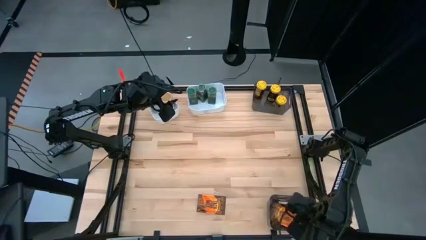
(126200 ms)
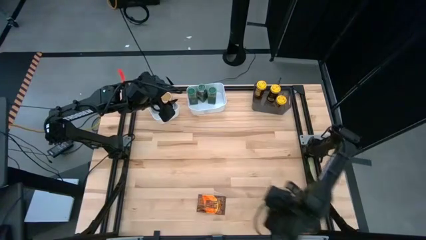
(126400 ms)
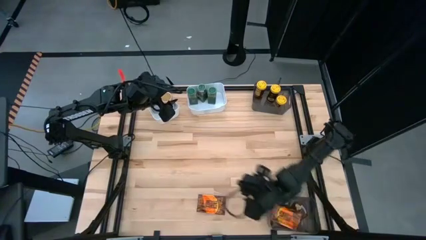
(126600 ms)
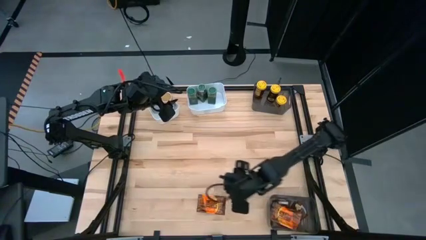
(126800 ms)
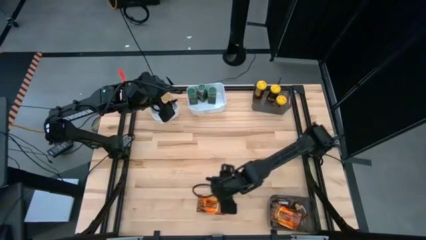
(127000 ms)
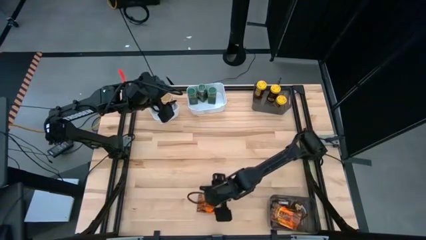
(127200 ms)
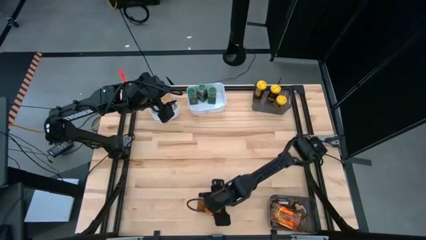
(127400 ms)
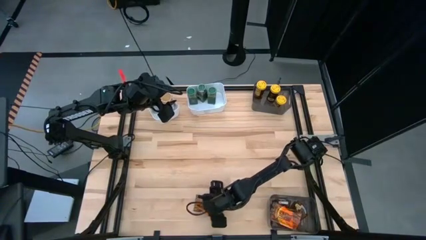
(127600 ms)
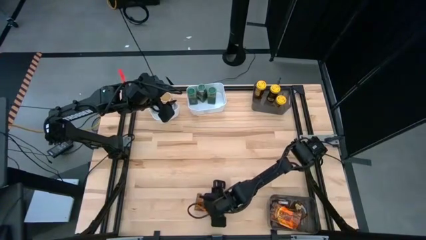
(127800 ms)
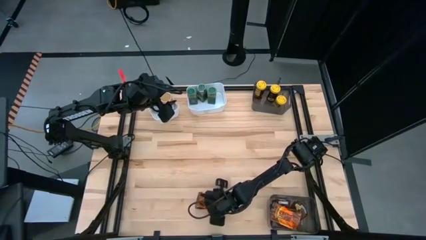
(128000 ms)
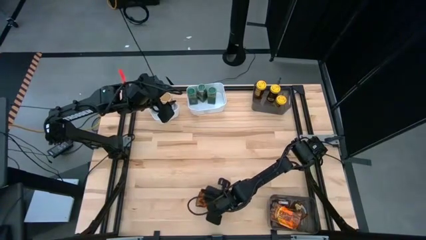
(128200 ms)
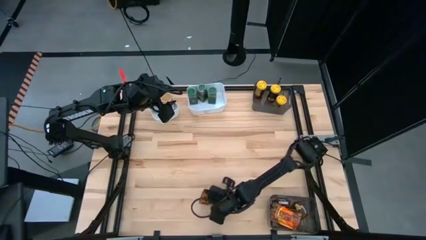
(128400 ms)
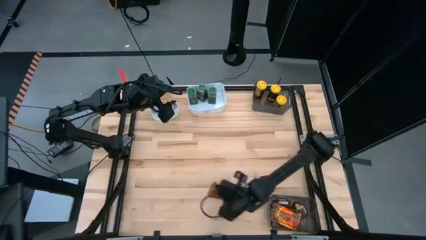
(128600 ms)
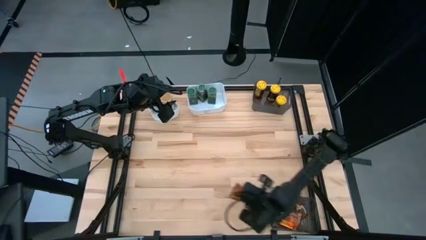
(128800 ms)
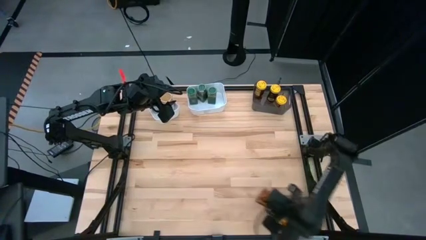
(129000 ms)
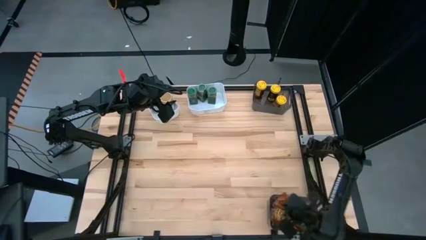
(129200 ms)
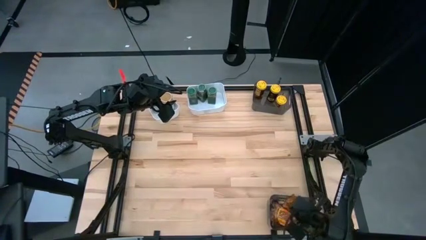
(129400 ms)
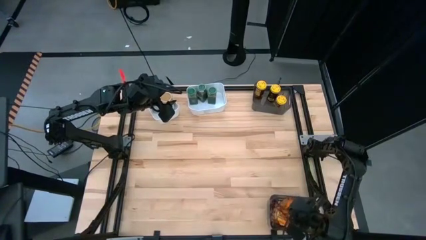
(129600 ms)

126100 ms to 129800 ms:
Task: Sort spices by type
Put the orange seasoning bag into the bottom black bin

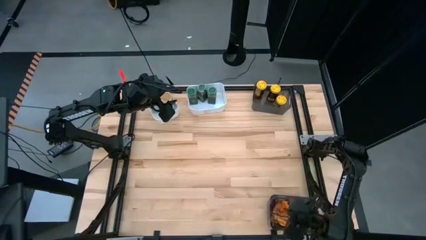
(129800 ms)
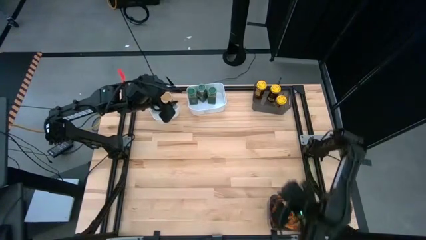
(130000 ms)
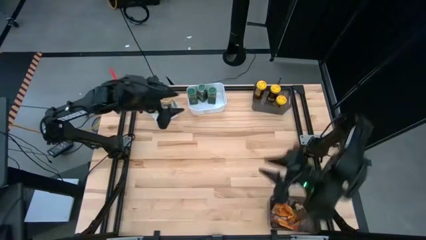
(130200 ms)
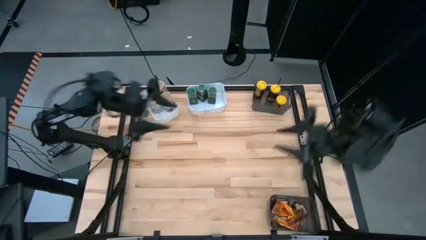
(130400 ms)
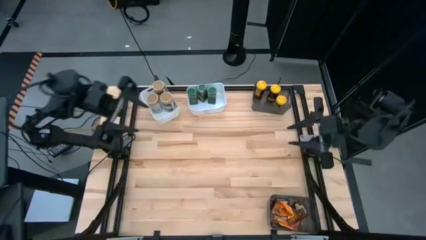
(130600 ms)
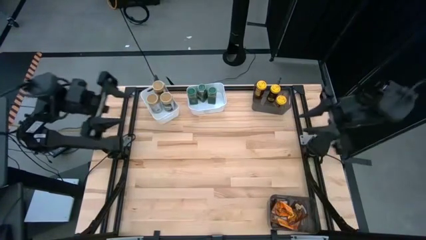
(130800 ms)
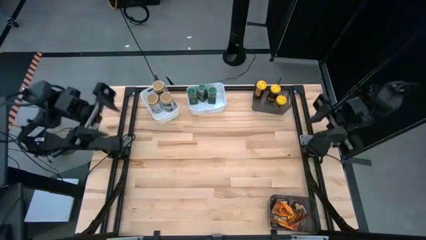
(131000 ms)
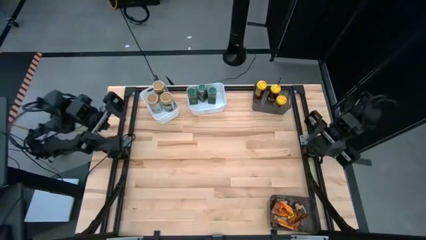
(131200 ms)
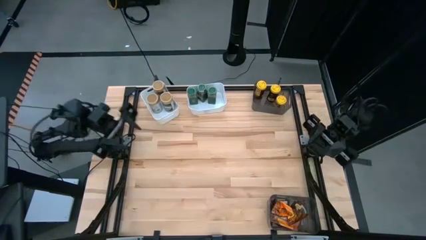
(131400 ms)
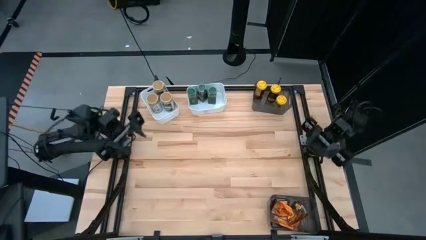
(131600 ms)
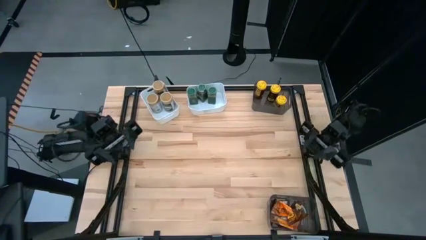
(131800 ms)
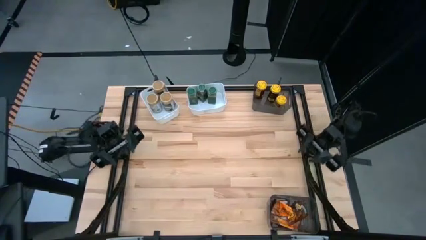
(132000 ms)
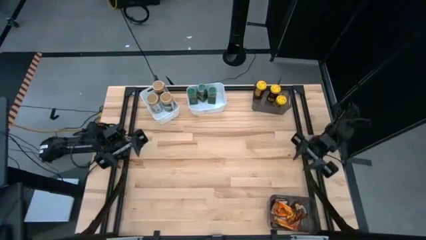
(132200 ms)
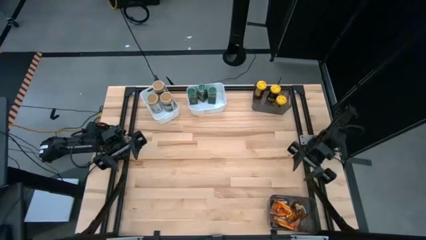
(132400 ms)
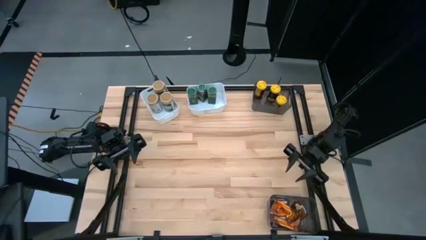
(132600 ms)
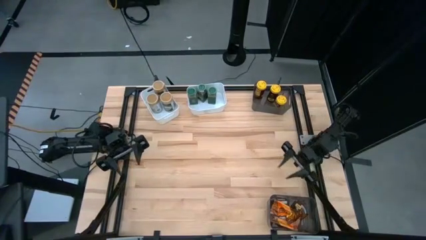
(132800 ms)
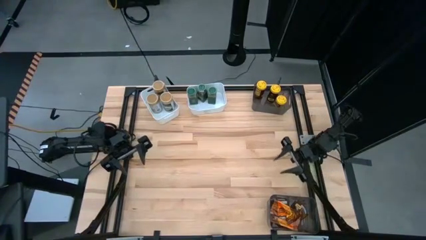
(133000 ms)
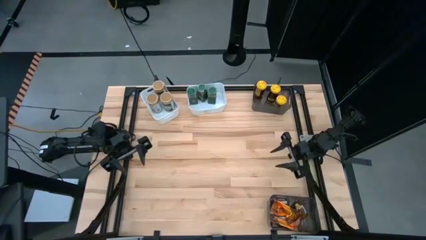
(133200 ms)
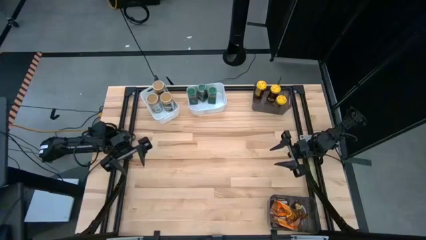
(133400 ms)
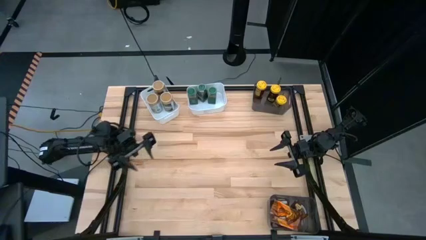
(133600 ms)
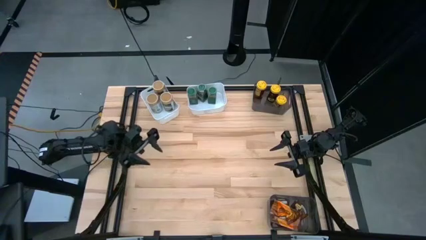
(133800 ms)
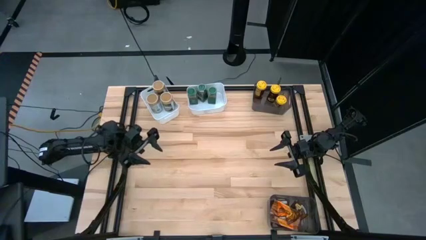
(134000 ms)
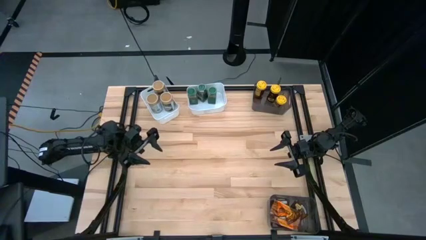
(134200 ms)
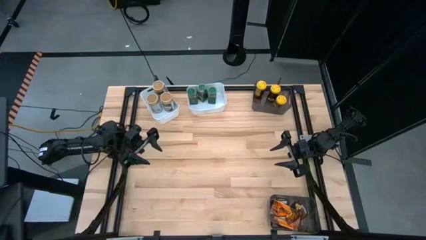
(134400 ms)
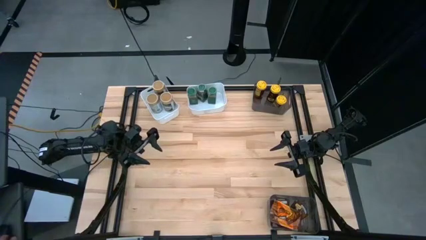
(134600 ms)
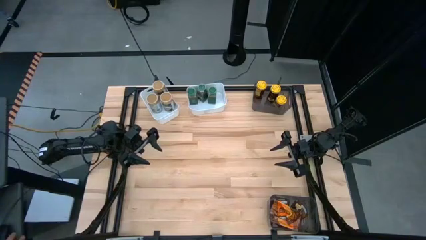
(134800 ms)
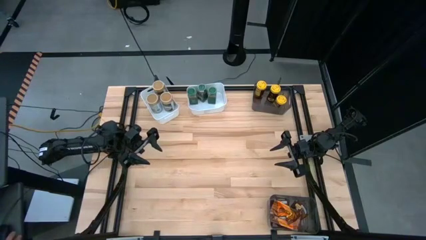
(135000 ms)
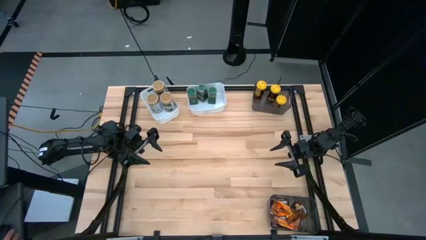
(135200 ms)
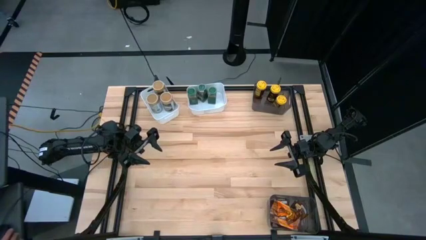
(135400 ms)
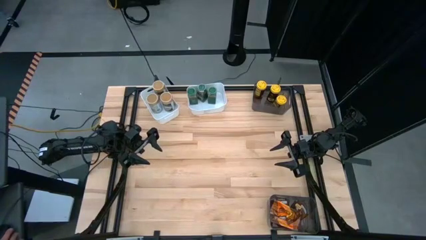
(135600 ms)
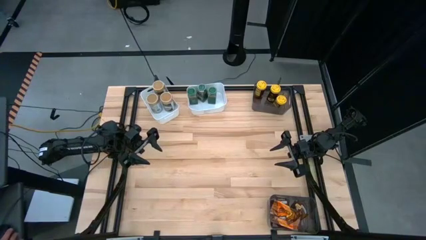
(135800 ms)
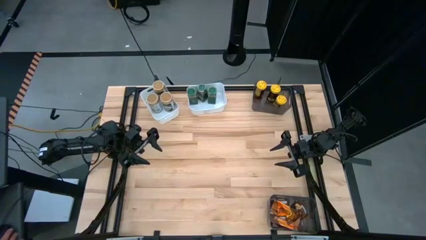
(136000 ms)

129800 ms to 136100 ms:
Return to Home Position

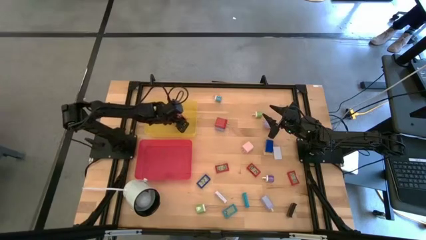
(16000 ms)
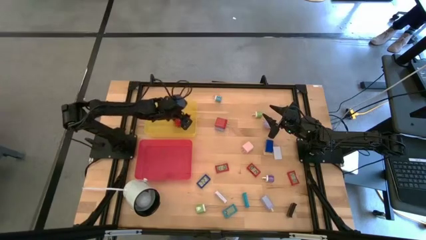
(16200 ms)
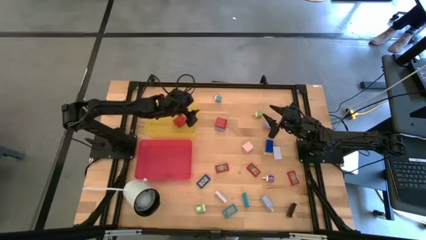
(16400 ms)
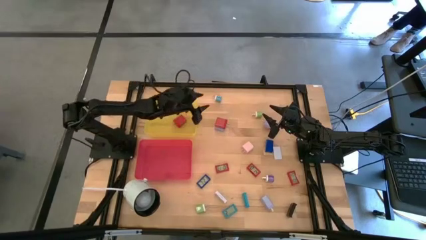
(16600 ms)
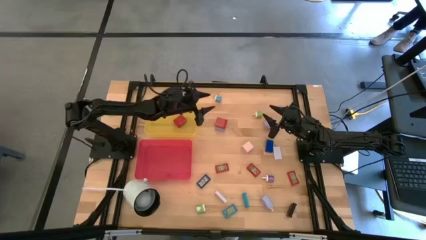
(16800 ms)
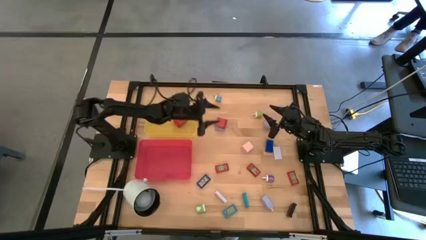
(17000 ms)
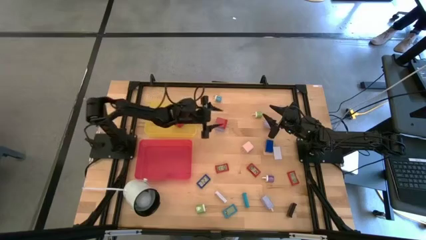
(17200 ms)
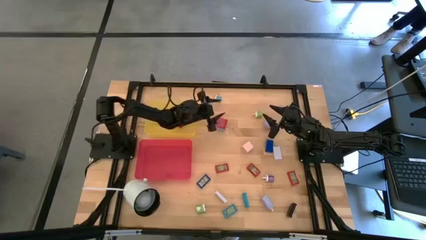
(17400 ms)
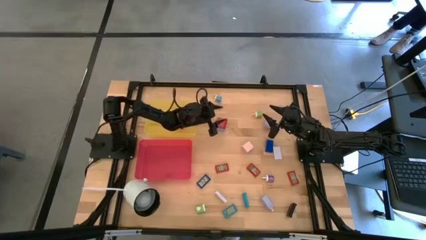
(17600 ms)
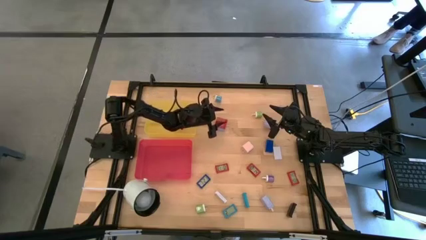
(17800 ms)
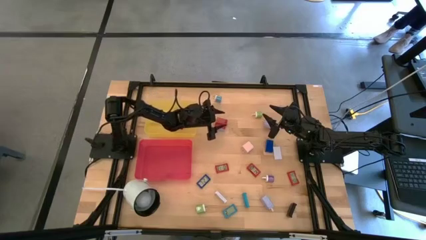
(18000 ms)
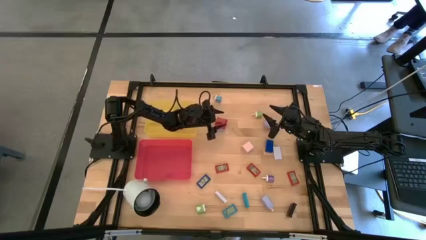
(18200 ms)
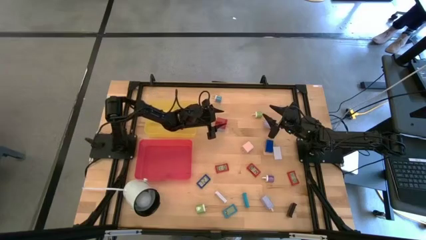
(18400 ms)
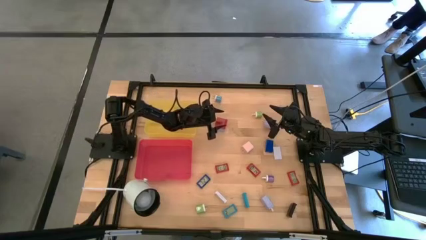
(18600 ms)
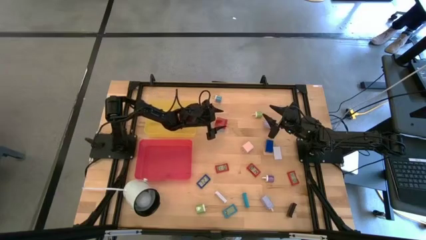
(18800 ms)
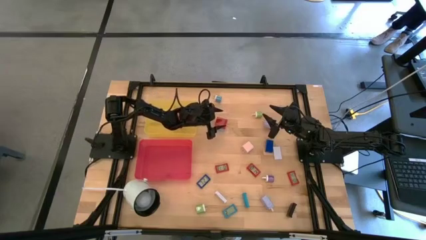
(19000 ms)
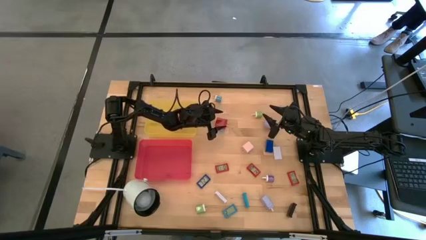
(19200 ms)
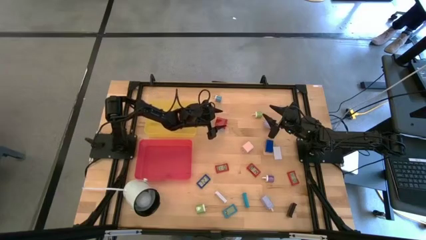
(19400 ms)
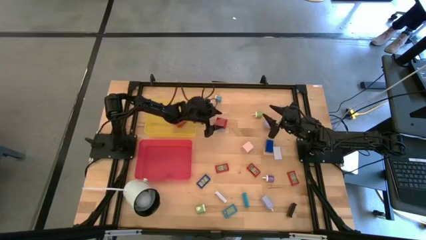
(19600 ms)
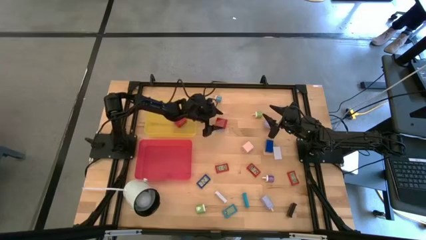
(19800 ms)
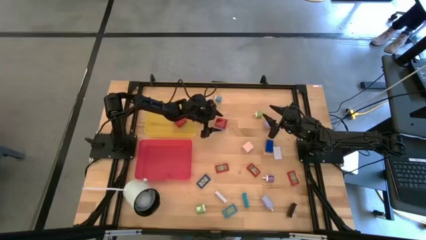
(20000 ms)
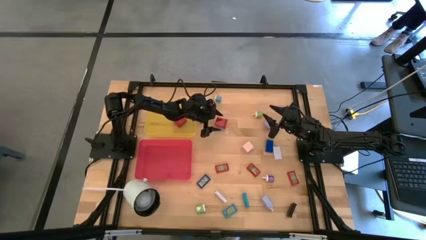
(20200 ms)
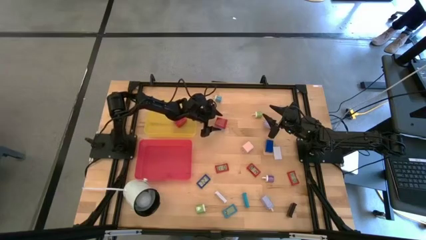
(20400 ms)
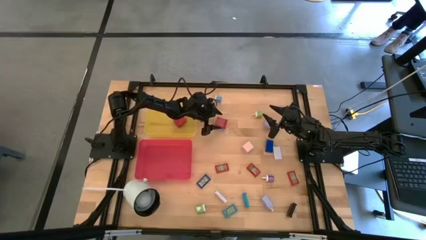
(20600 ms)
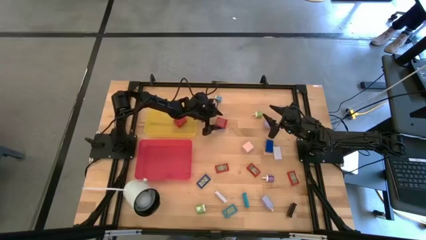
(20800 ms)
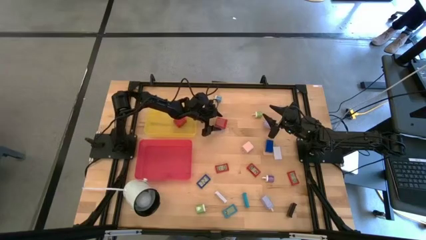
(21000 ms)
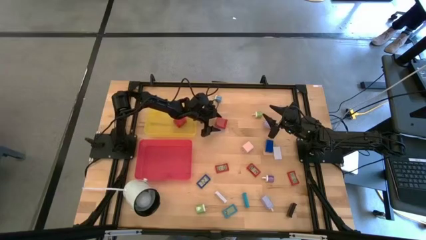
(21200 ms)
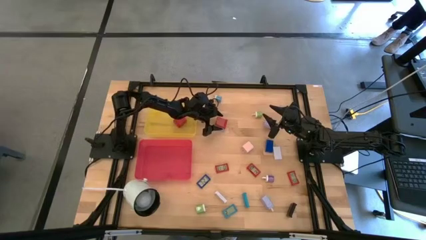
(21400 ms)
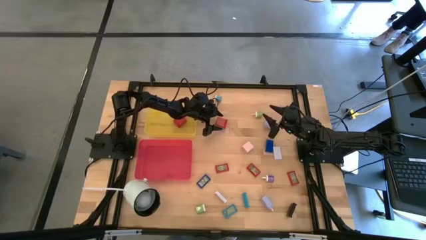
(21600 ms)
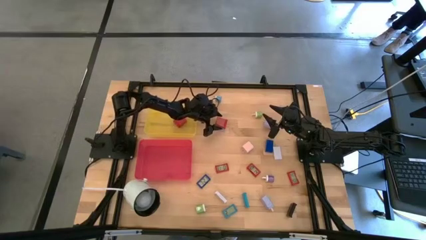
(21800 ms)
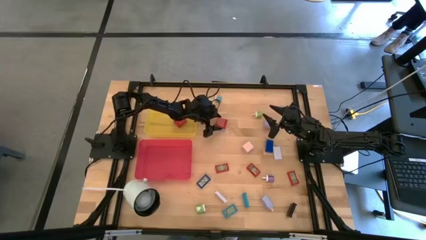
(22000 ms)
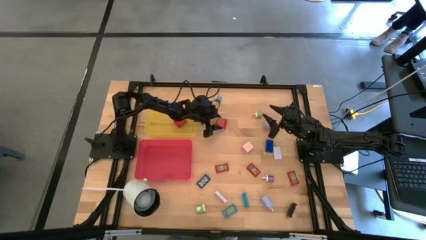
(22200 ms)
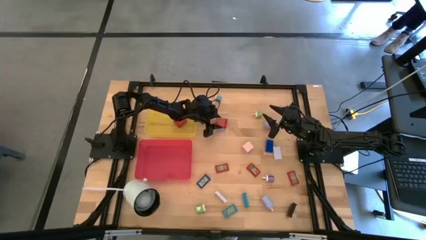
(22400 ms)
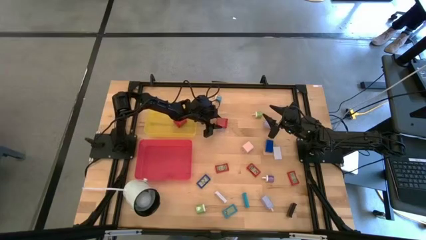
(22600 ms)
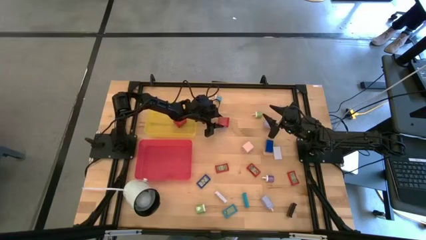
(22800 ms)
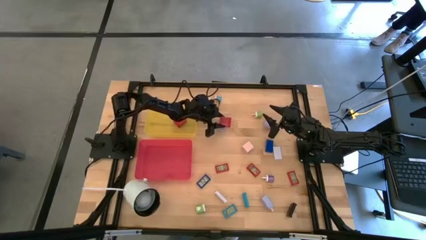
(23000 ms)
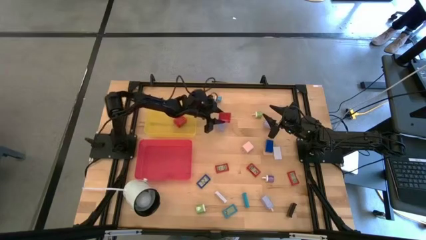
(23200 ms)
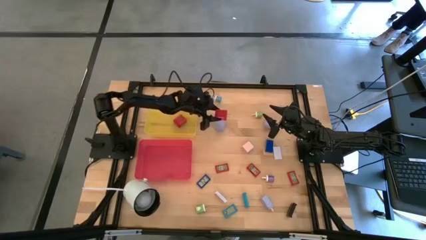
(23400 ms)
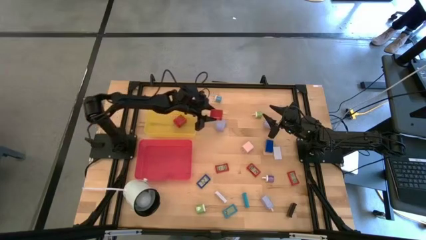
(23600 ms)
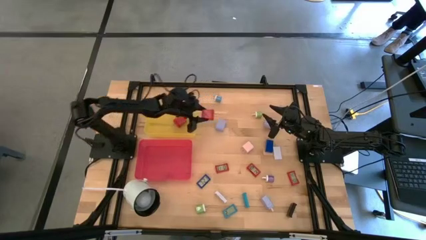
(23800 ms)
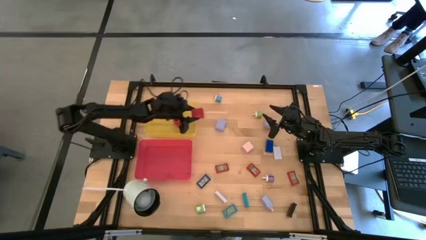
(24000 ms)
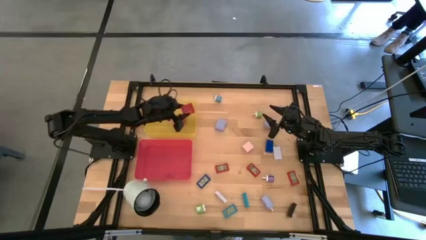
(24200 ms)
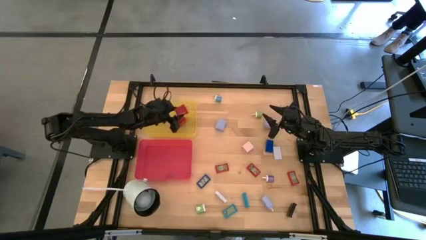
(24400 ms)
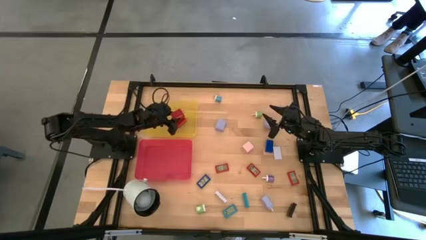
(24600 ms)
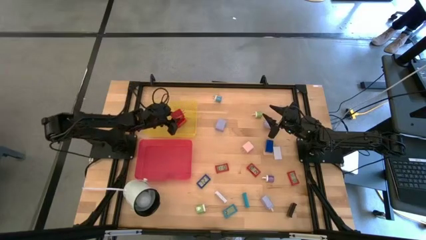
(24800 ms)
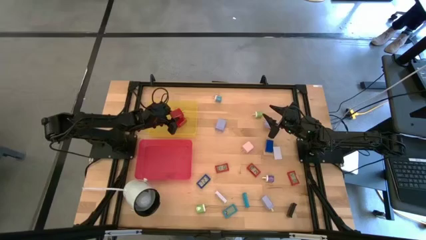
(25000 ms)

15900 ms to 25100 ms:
Task: Pick & Place Office items
Put the red charger adapter into the yellow bin
